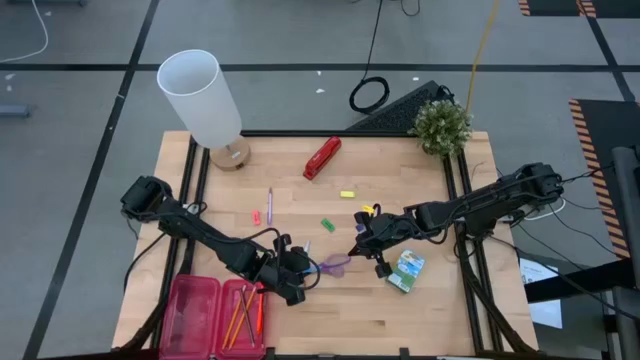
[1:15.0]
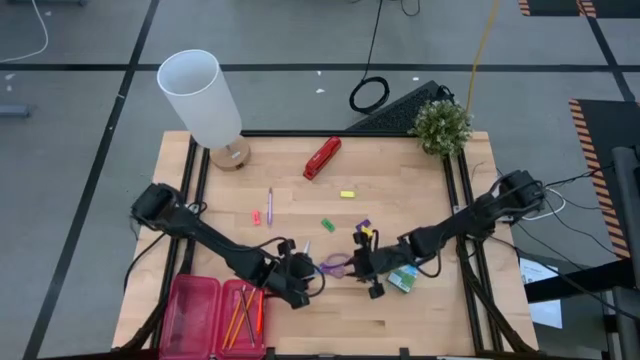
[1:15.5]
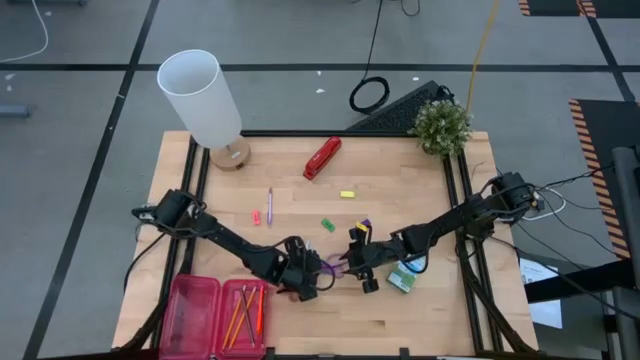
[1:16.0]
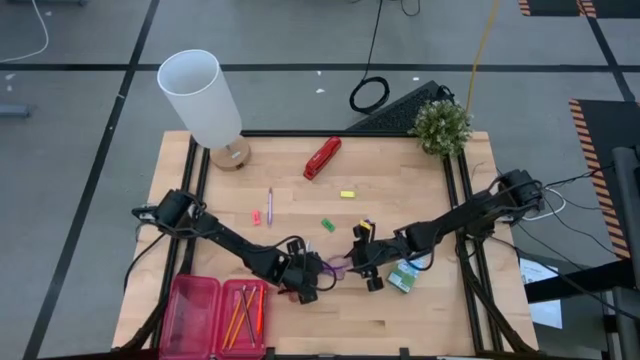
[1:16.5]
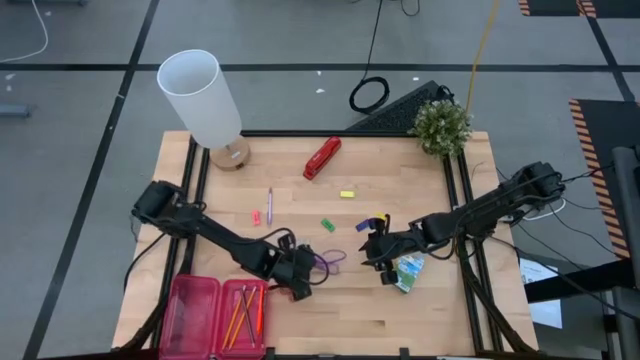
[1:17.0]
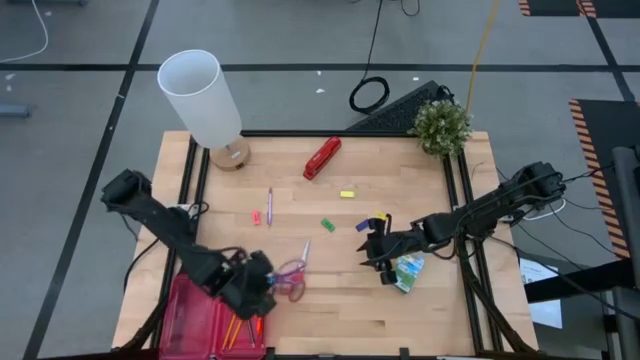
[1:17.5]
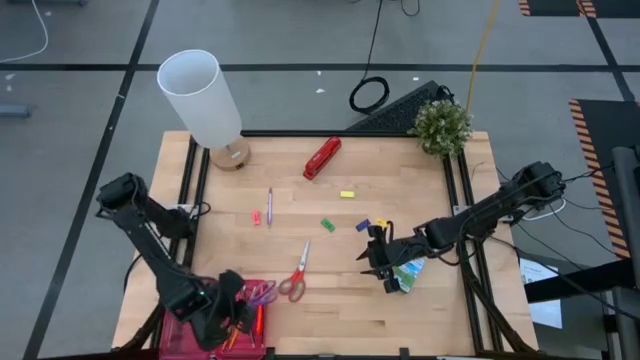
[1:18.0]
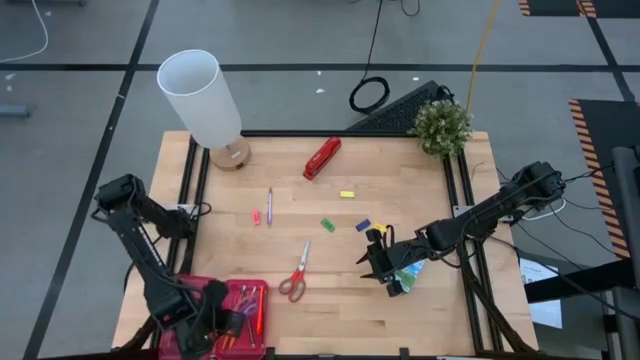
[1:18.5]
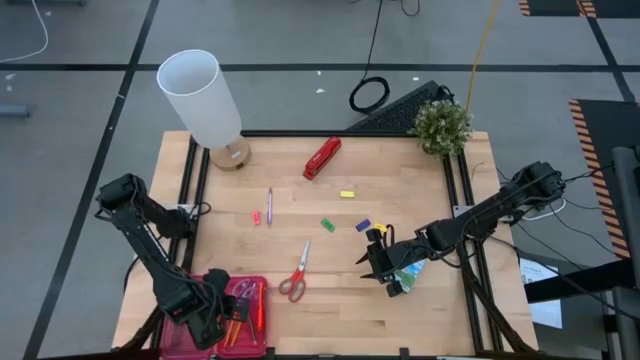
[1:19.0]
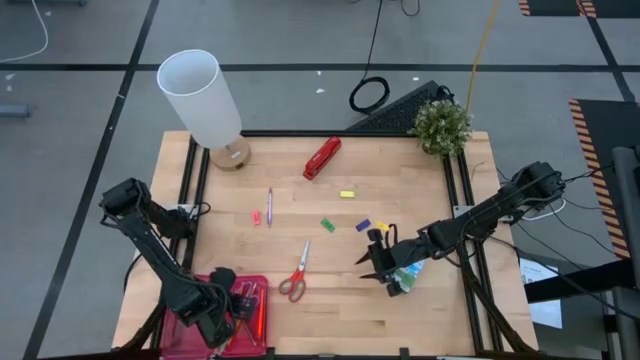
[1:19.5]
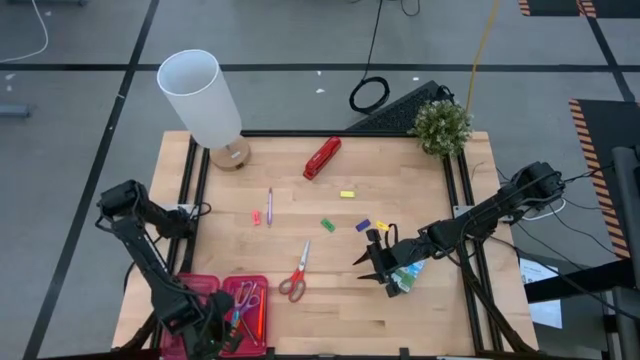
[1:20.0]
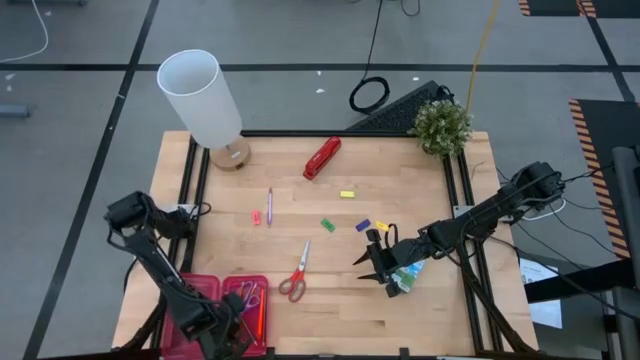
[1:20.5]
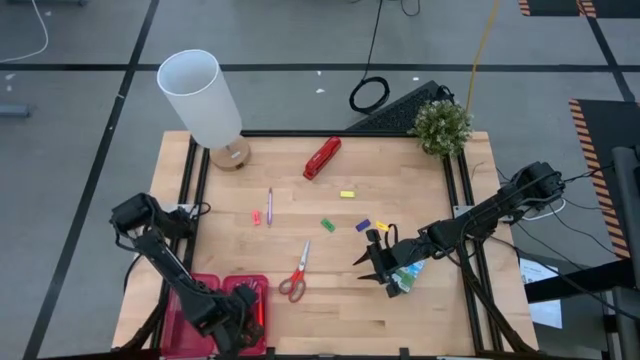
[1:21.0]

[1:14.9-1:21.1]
Task: Pack school essentials
Put the purple scissors into the red supply box

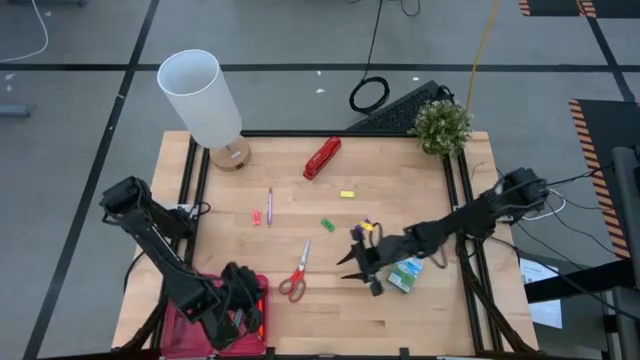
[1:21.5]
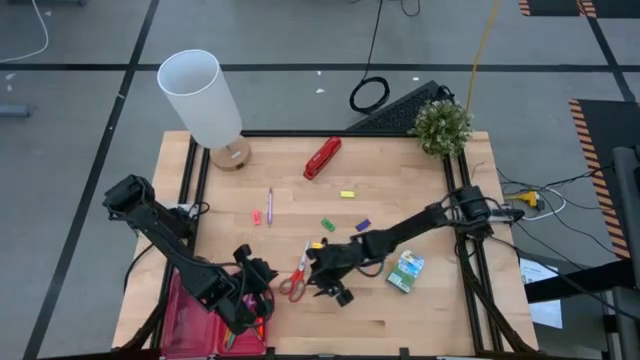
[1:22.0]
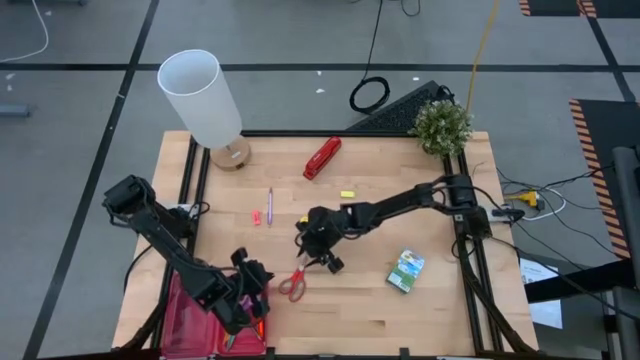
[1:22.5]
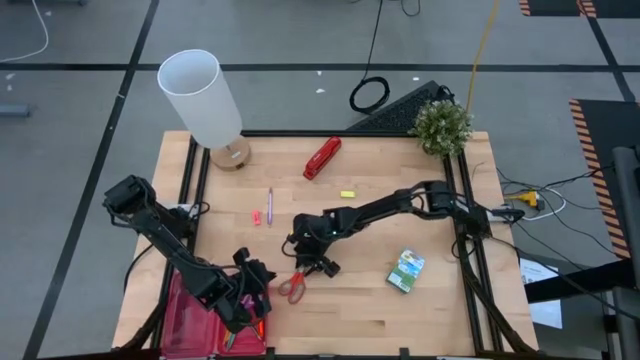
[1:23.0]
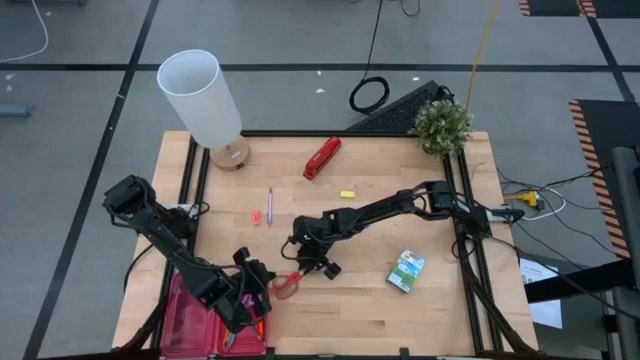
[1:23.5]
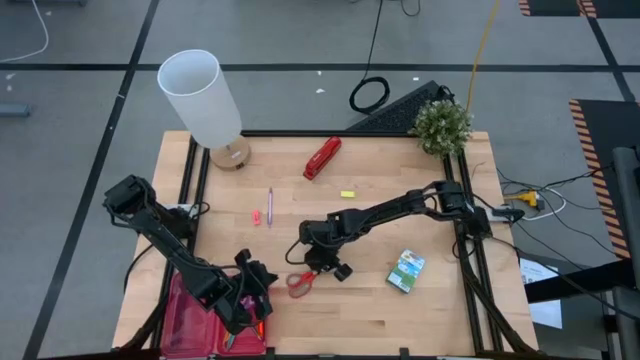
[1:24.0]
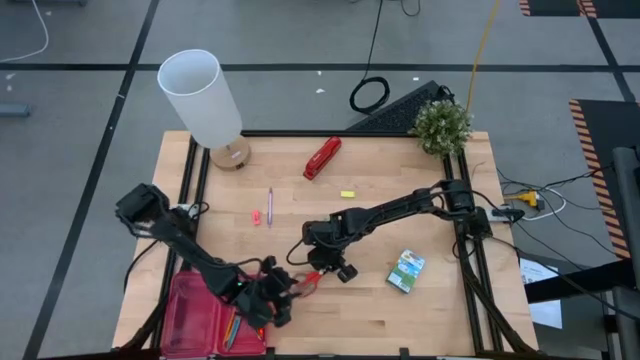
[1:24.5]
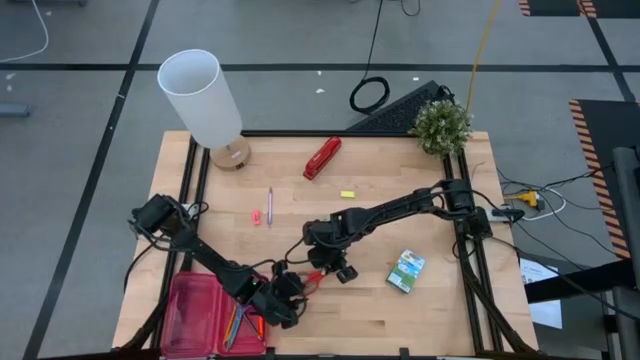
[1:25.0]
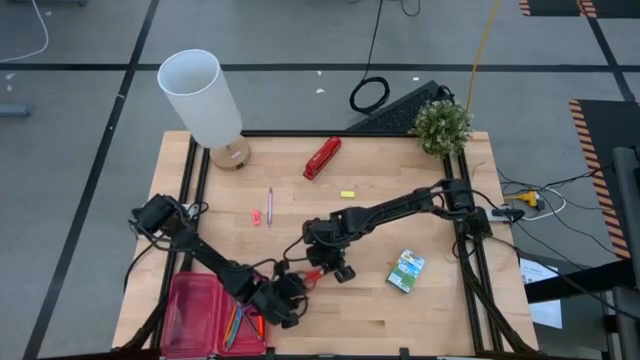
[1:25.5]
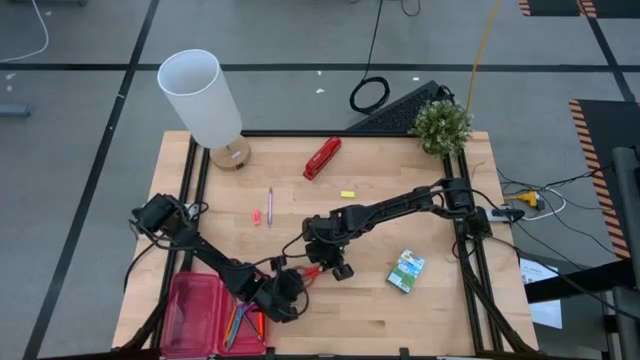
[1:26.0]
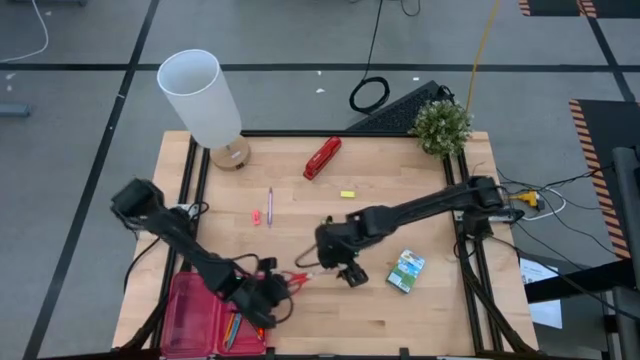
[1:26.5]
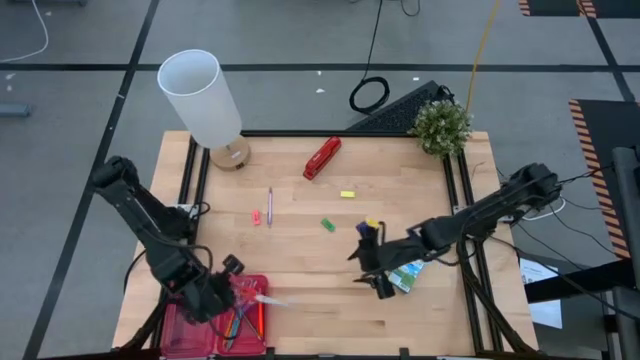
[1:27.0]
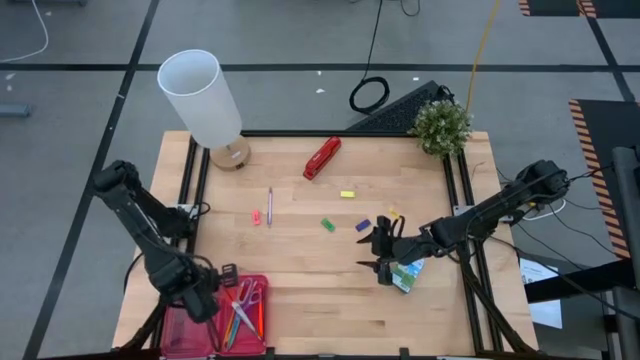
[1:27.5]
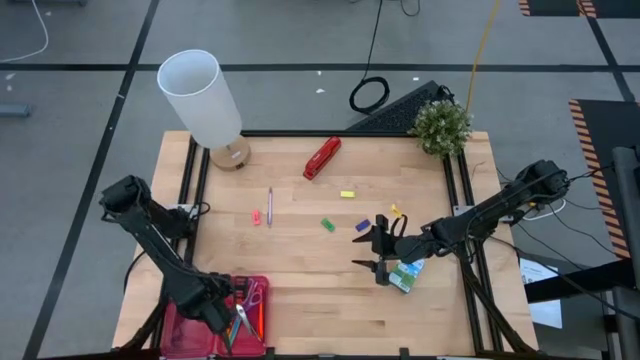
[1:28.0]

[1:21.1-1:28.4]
Put the red scissors into the red supply box

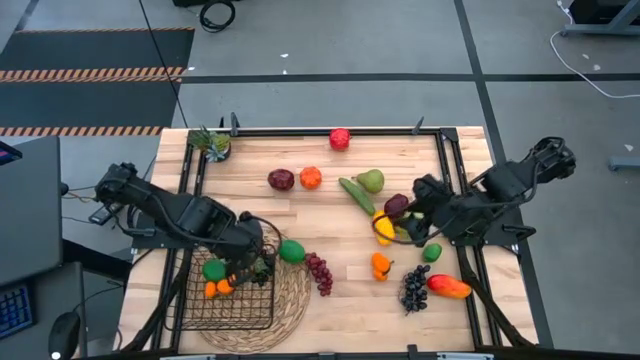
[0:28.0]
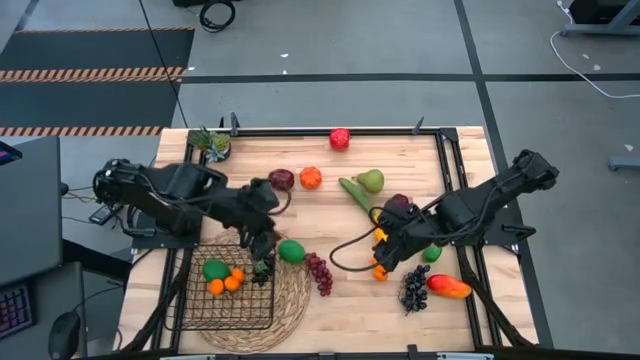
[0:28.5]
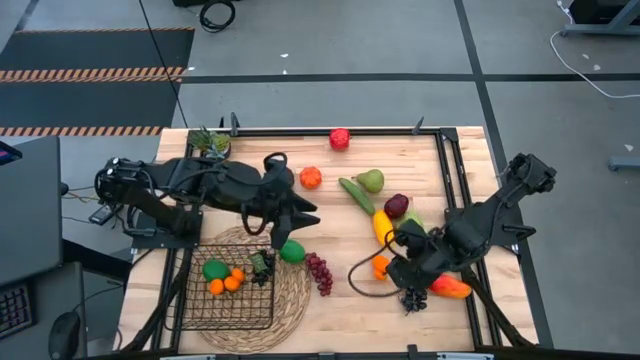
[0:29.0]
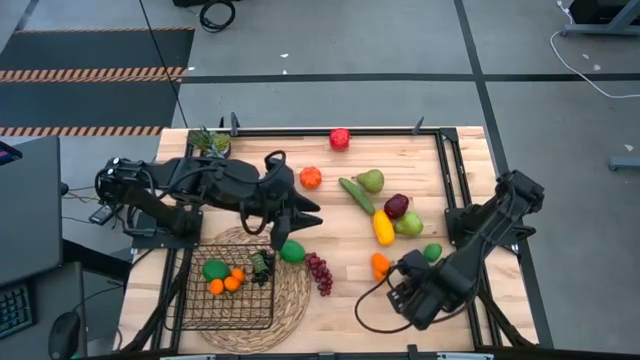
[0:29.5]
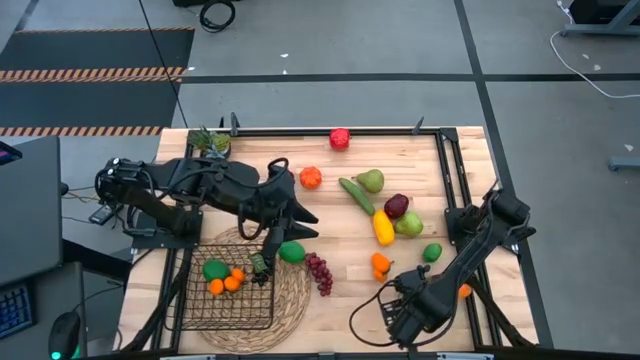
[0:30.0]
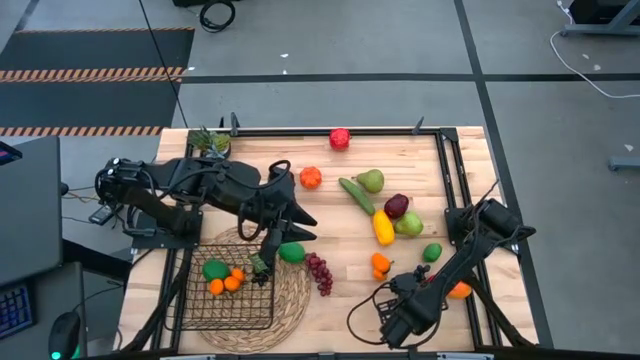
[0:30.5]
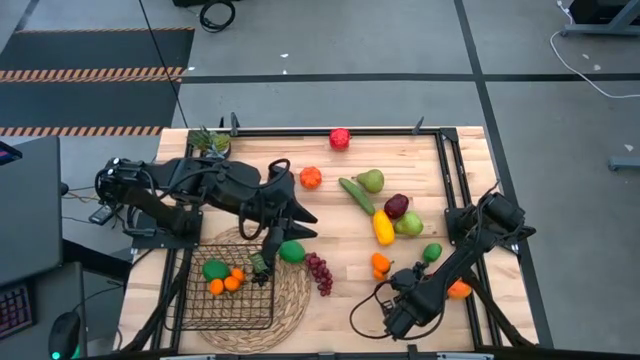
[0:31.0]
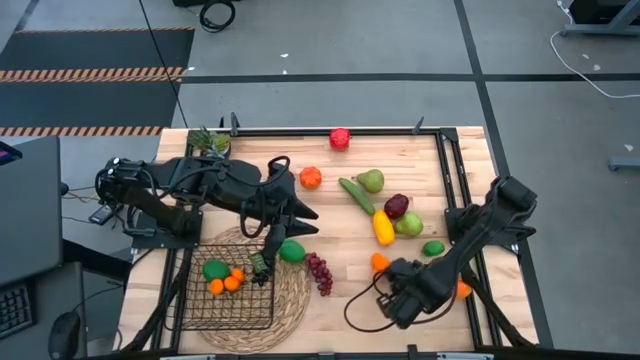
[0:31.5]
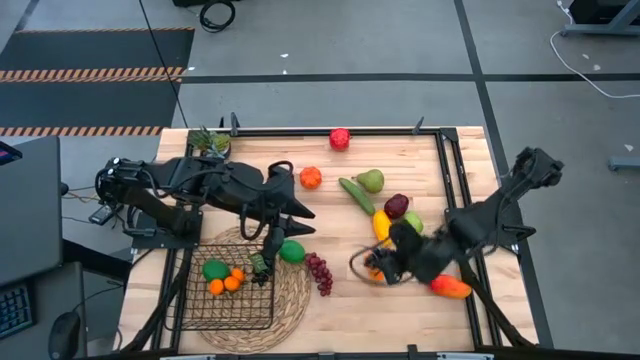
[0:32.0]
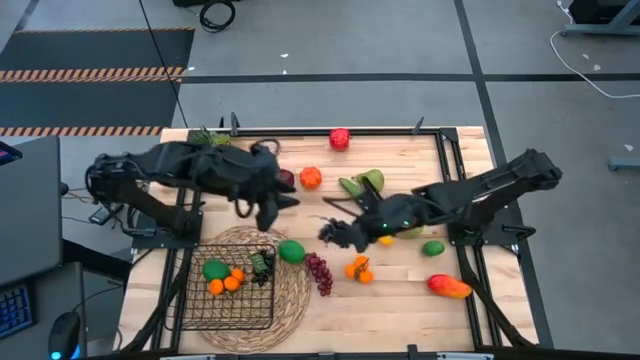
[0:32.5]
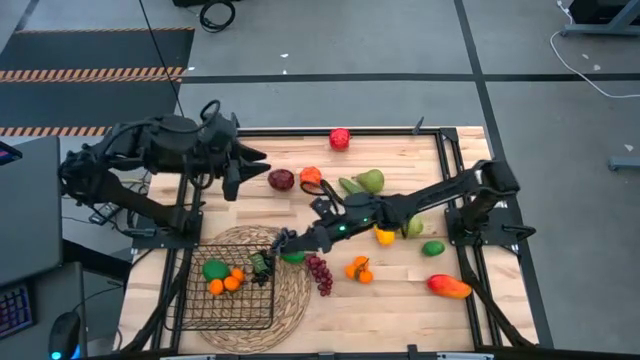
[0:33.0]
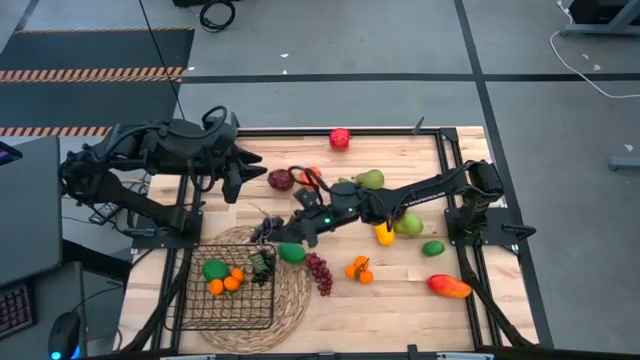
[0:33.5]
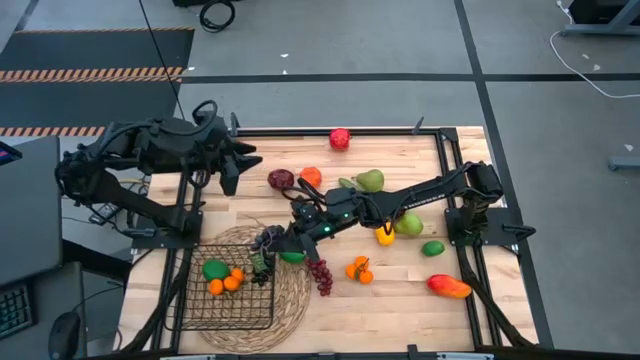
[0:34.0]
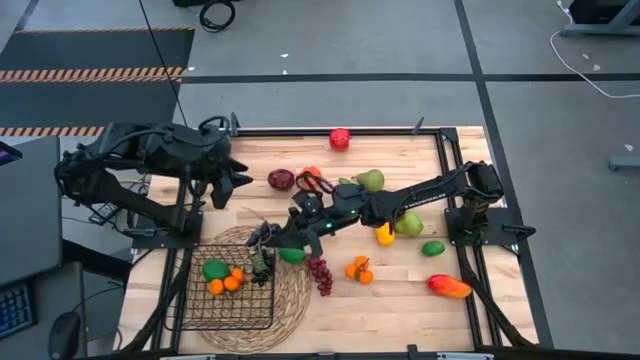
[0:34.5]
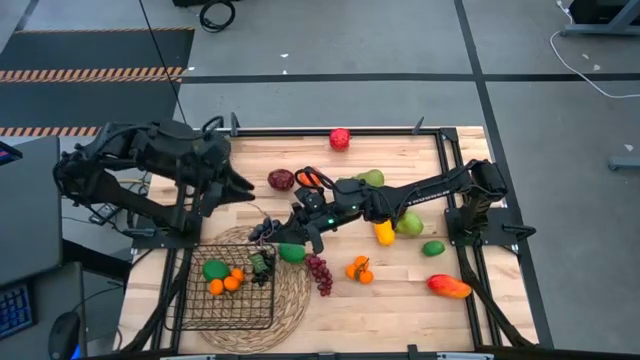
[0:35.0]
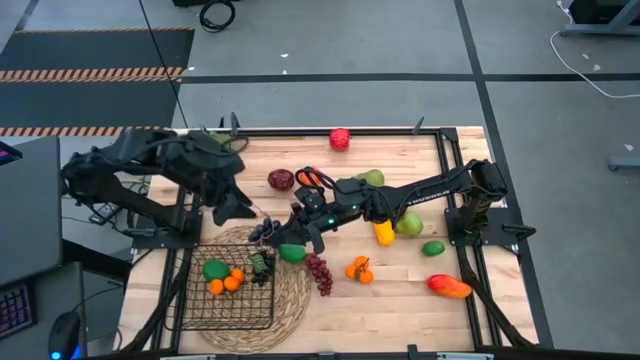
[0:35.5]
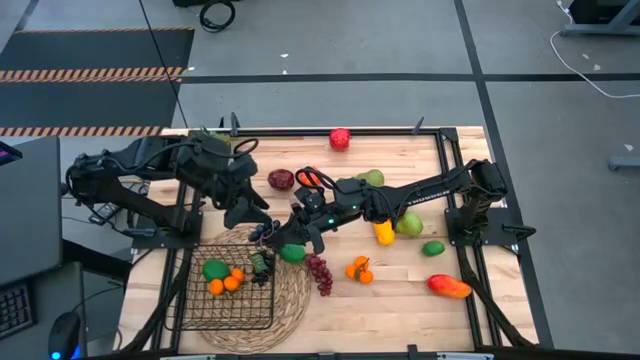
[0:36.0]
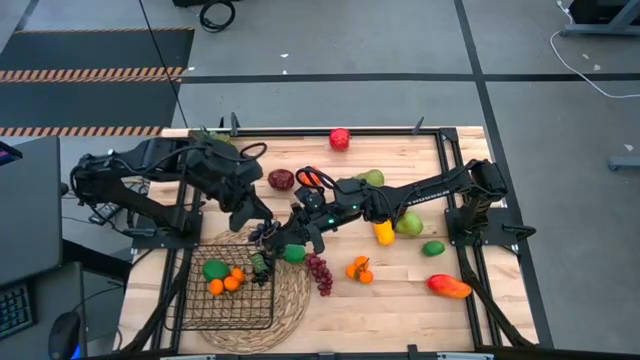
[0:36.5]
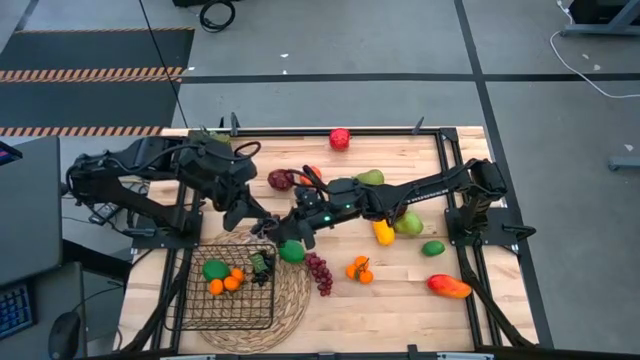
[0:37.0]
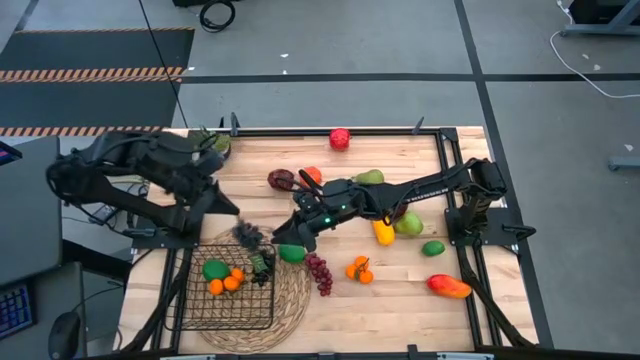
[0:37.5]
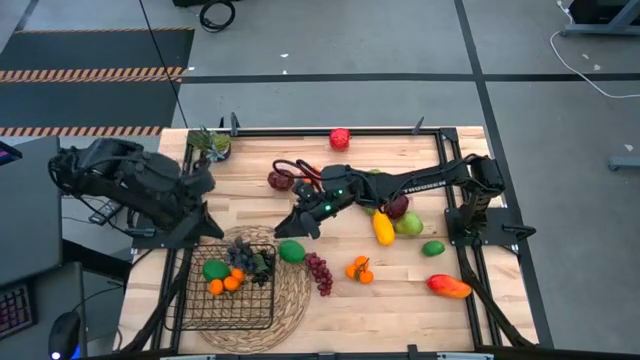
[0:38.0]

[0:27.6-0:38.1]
Task: Build produce basket
Put the black grapes into the black wire basket
